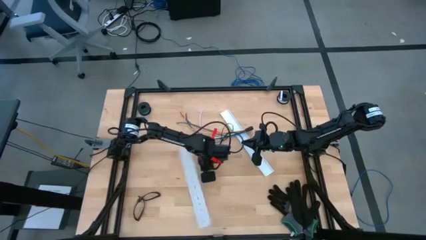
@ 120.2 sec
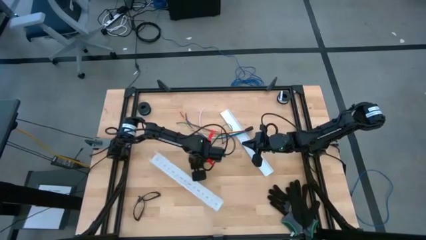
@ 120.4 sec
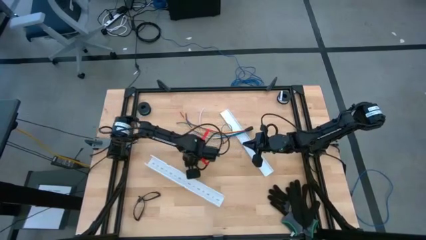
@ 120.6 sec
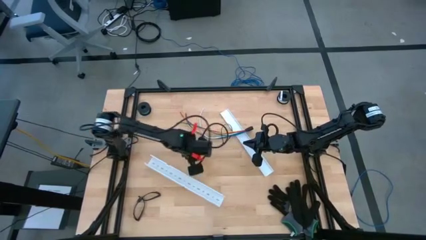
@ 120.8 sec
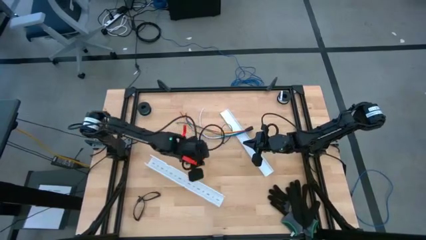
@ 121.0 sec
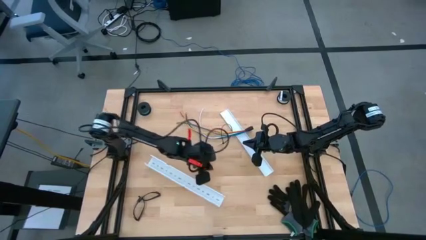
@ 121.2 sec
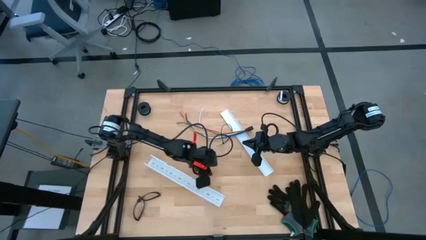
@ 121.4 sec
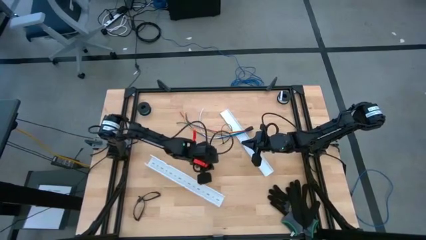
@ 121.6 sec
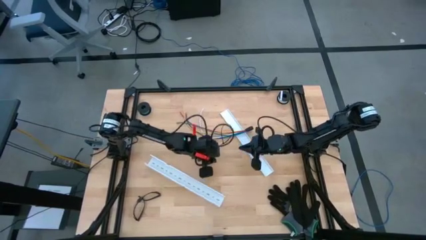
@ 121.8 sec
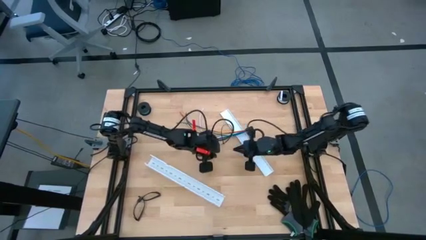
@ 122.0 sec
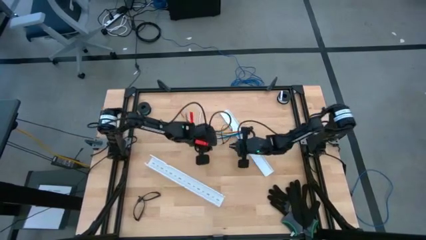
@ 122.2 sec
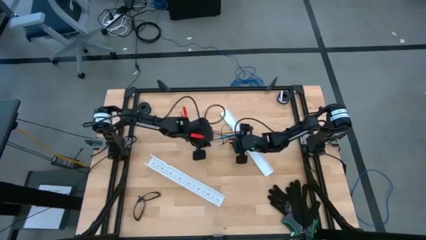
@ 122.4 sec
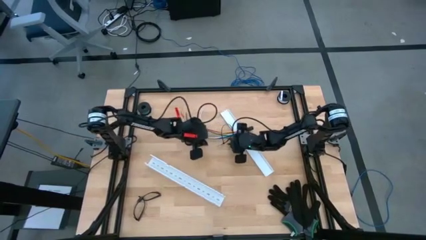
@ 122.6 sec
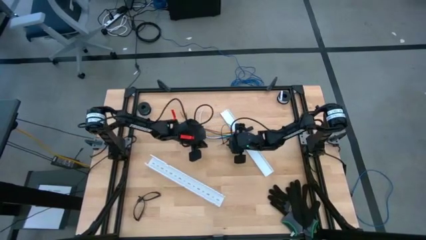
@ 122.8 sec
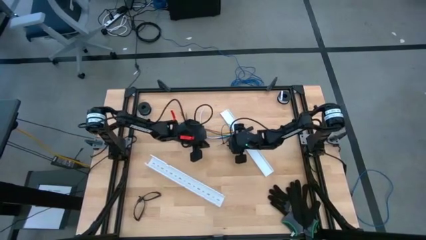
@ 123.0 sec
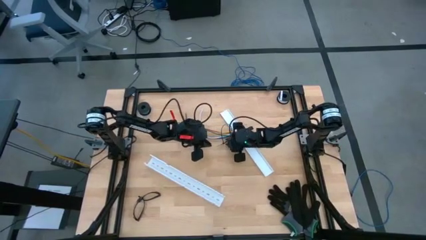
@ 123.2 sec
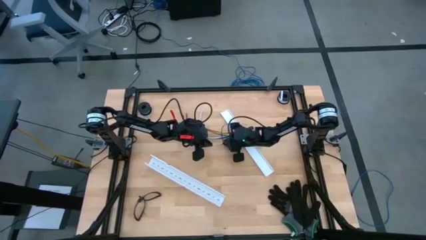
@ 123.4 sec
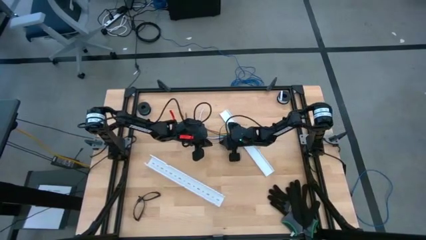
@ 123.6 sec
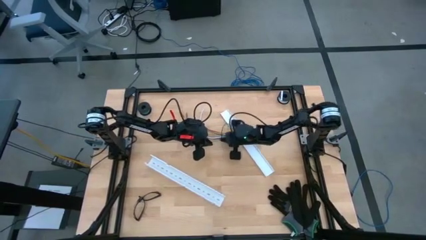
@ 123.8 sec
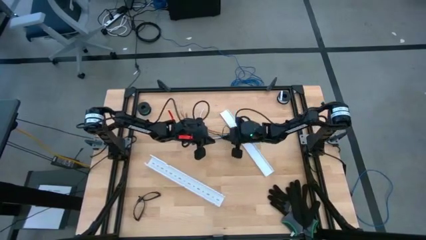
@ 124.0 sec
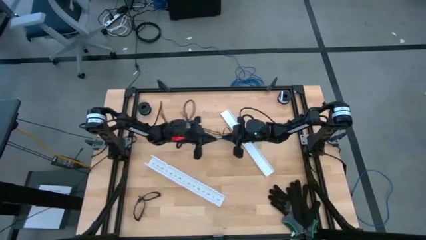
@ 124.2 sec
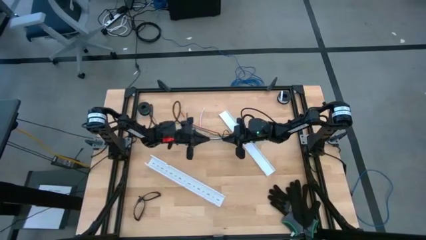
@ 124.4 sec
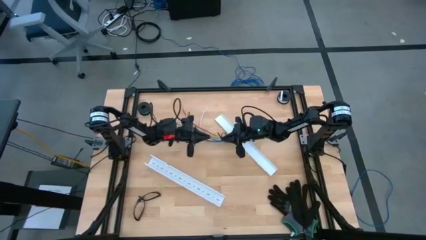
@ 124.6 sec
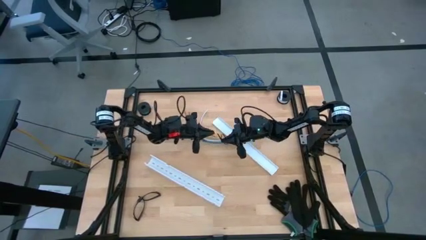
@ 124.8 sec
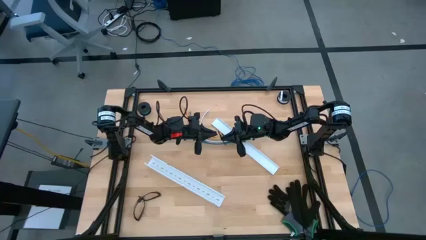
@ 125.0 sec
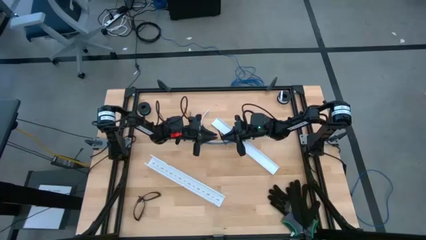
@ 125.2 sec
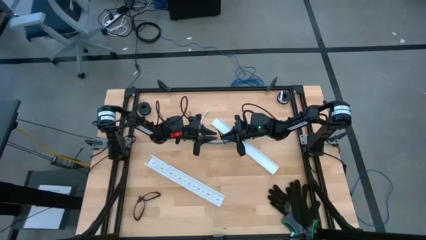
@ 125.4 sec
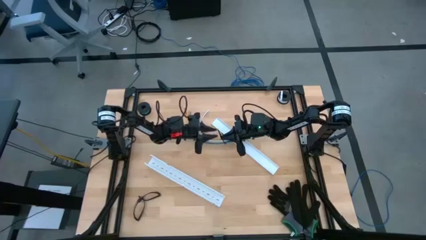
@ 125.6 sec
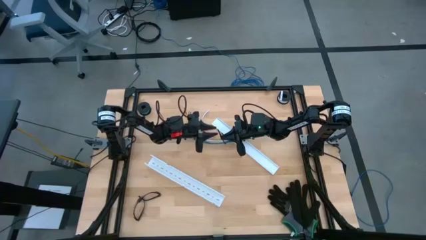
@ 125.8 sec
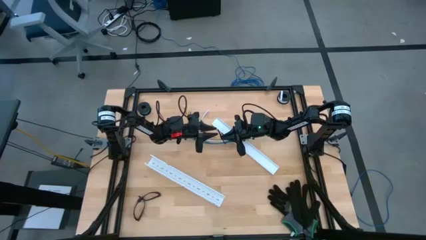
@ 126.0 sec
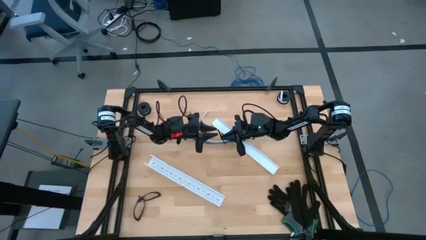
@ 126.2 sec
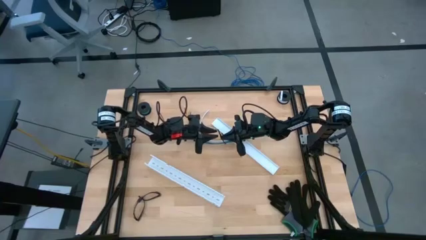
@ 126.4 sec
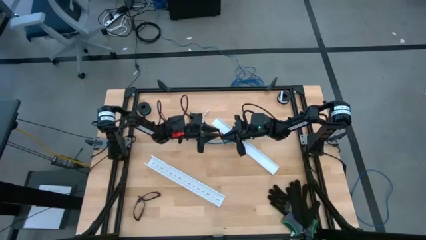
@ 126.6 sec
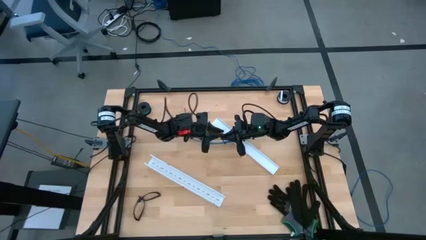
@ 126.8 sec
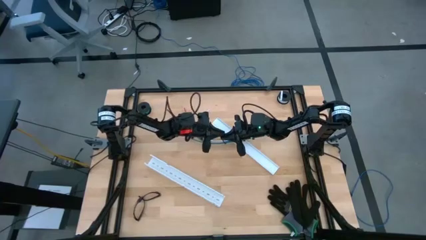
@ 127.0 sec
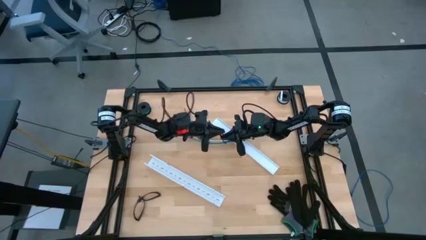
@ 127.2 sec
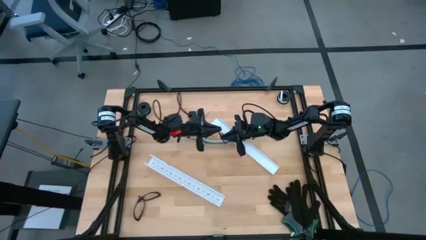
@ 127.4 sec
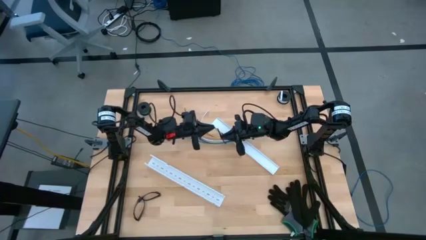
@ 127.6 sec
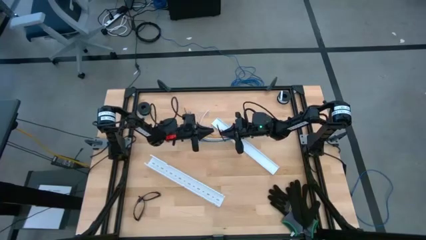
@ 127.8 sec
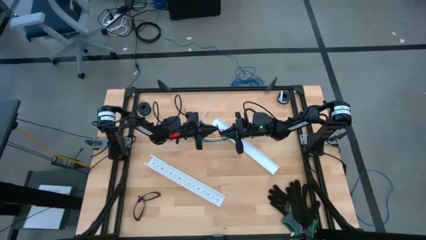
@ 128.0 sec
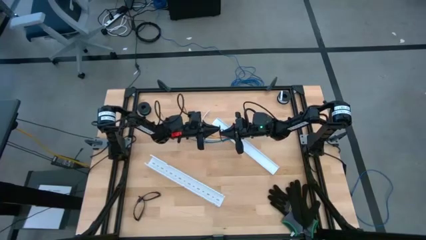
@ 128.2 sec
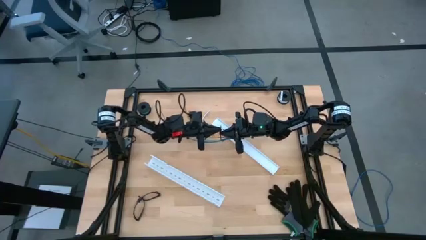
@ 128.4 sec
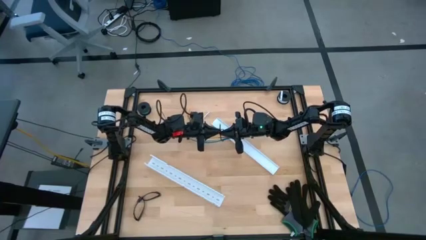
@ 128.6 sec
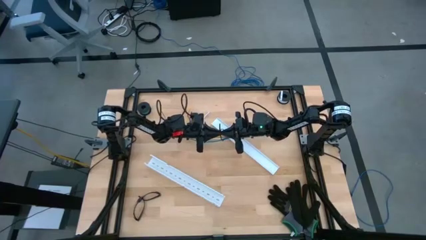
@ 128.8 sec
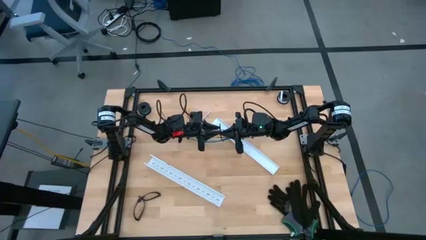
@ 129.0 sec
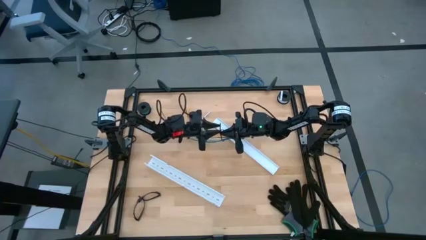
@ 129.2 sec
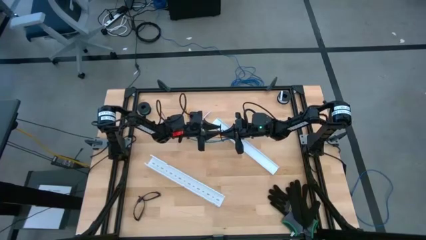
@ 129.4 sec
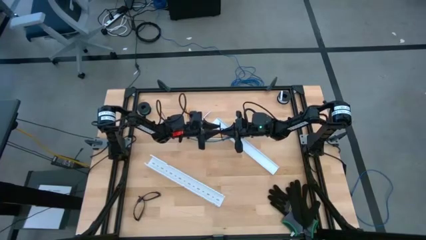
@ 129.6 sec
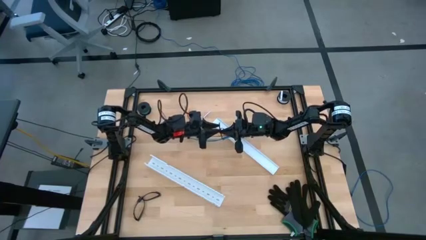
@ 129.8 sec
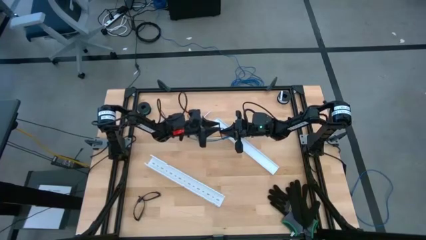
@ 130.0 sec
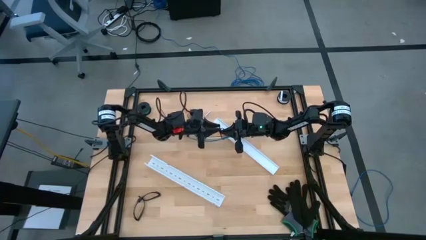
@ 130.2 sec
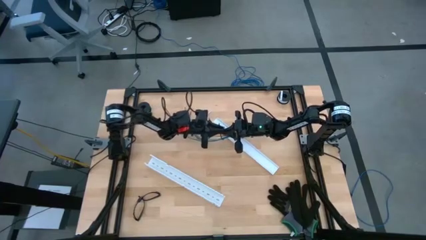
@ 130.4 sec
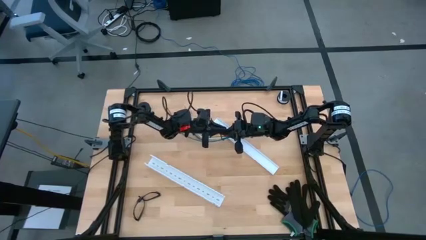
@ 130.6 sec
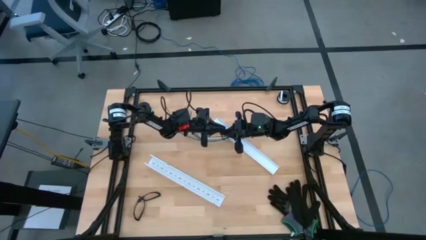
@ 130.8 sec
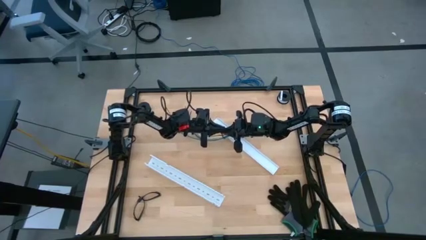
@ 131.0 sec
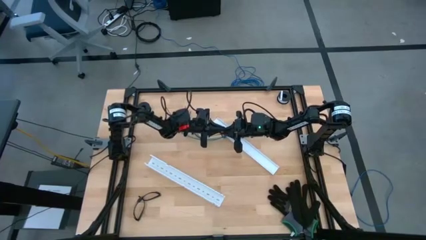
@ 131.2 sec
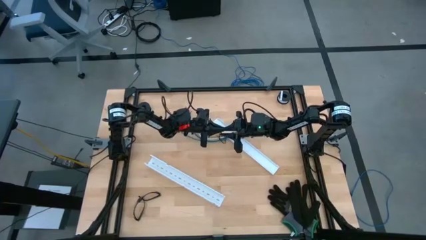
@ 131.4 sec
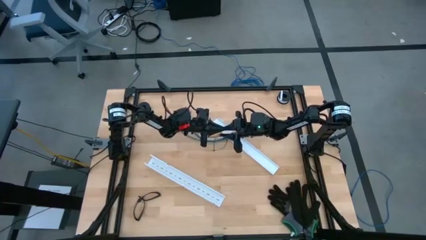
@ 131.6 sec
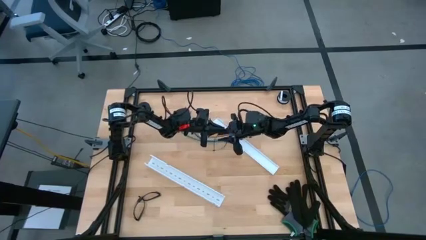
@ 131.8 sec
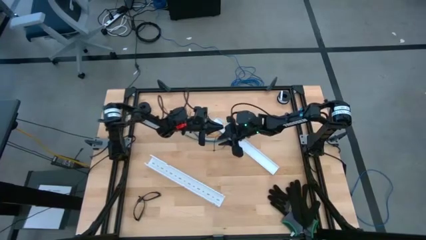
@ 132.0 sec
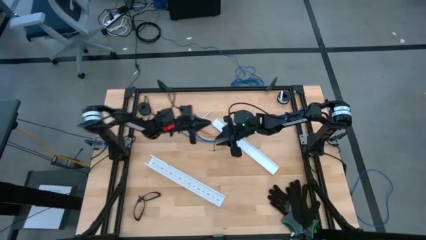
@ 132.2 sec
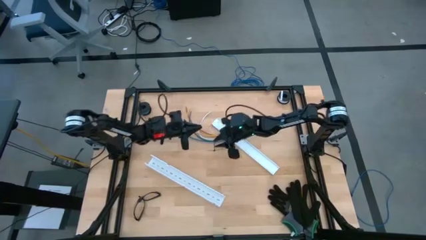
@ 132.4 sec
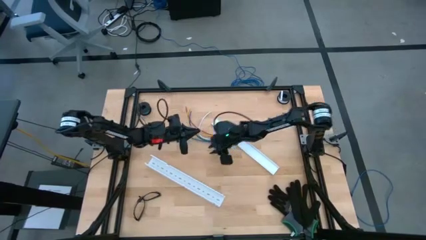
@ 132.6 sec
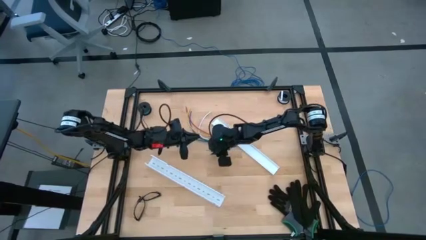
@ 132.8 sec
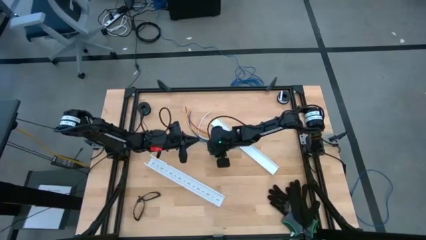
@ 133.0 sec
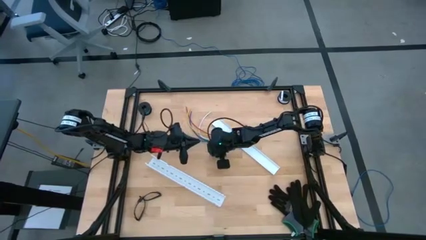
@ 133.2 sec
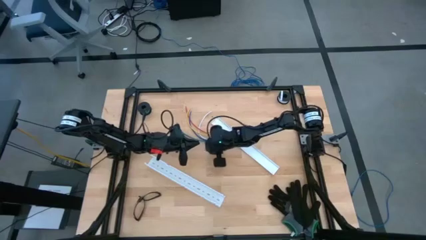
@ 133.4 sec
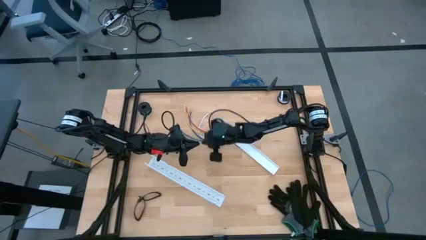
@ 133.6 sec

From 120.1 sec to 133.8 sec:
Task: Ziptie cables
Wrap the cable wire in the zip tie

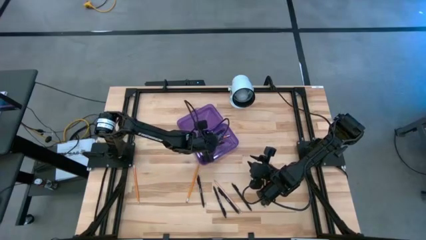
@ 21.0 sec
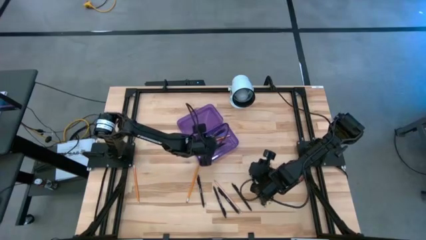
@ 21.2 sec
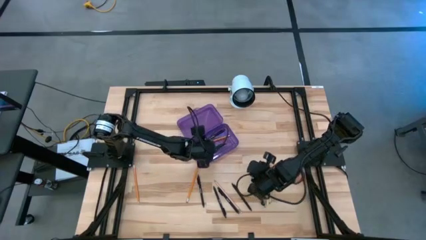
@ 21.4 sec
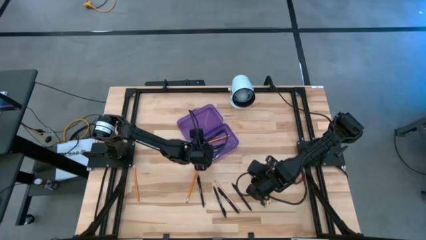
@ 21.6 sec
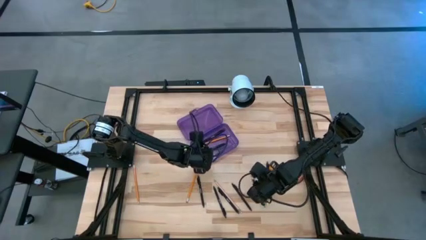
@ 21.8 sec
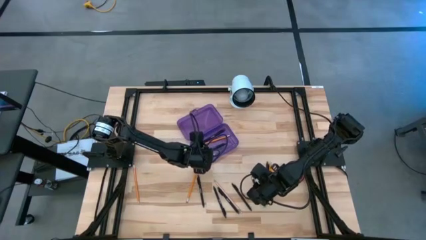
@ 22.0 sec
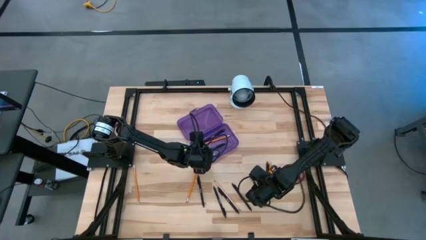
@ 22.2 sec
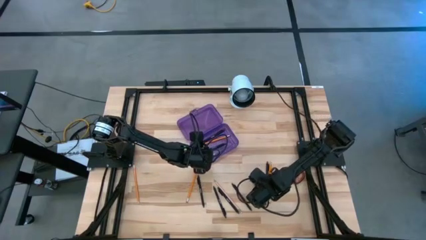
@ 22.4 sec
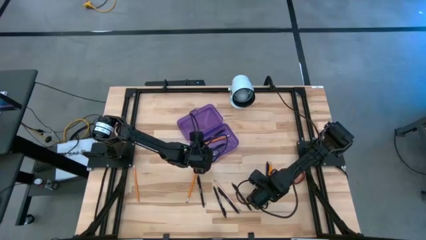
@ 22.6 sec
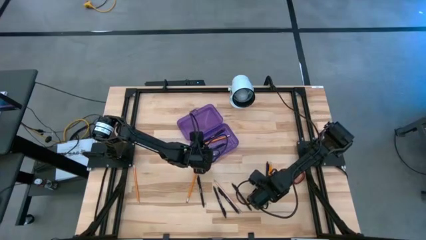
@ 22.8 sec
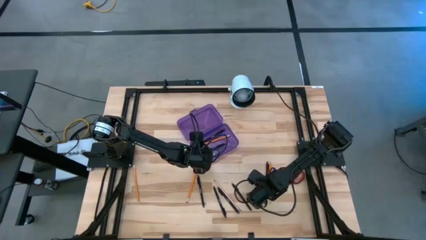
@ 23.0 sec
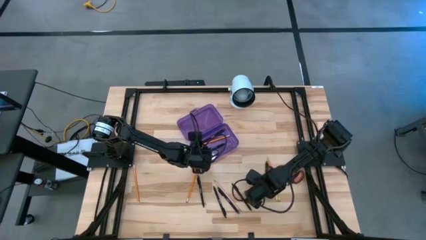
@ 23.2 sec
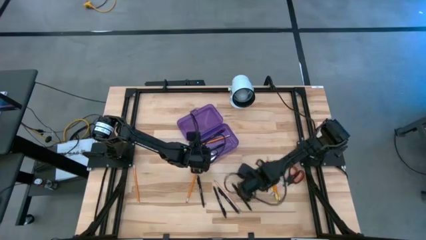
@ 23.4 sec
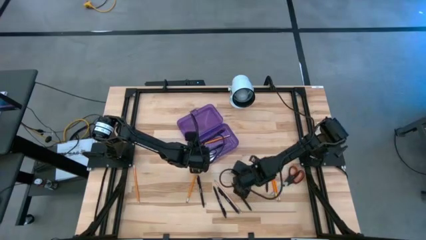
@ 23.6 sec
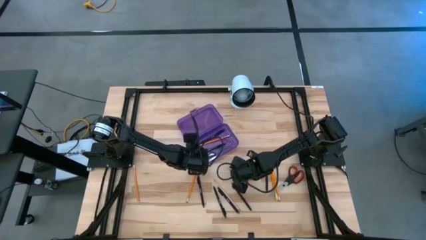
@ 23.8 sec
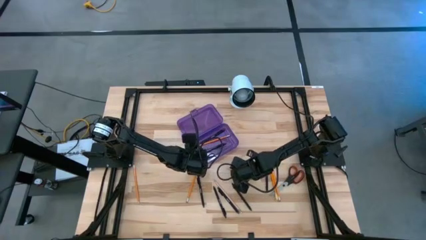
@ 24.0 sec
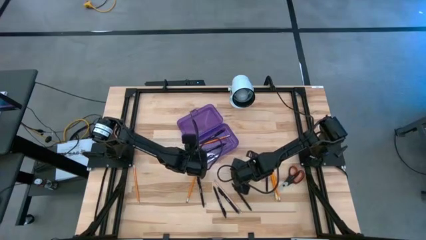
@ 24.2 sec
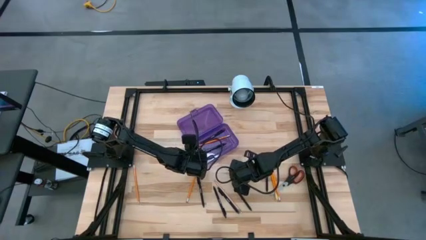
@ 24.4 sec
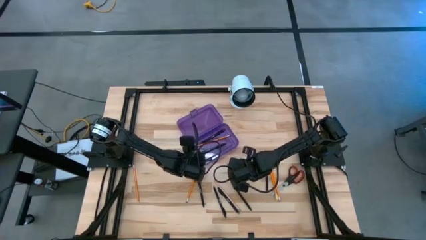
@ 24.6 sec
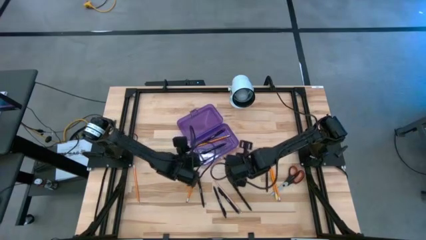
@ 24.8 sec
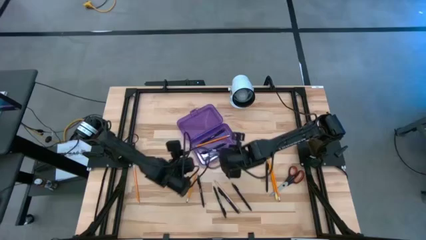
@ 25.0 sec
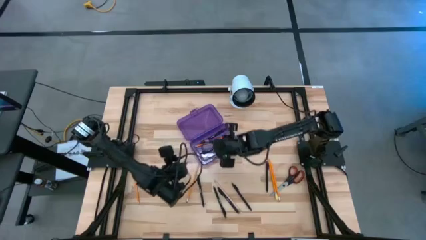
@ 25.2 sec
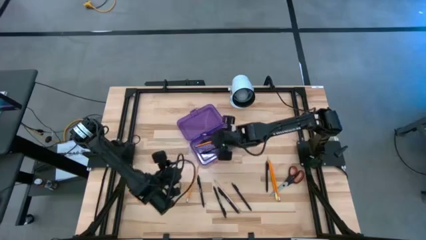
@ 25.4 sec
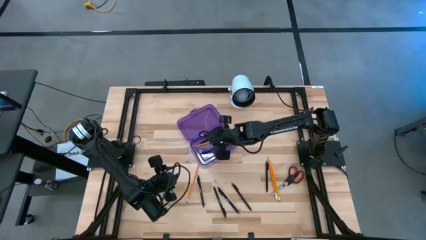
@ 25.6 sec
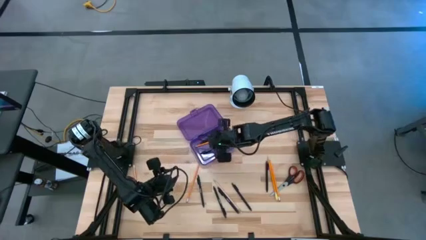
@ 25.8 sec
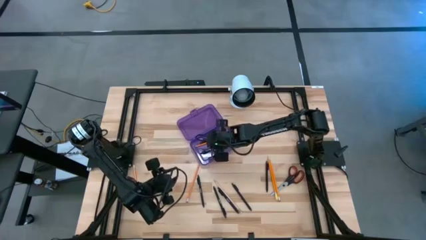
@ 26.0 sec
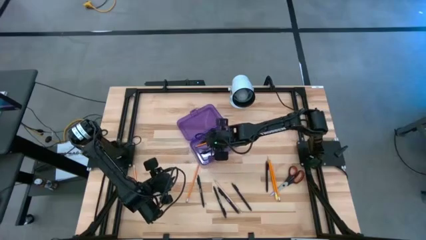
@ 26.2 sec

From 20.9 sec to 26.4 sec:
Task: Pick & place school supplies into a supply box
Put the transparent pen into the purple supply box
